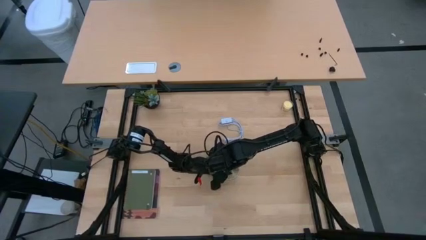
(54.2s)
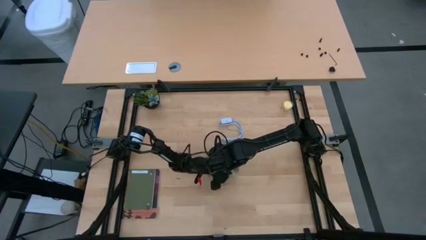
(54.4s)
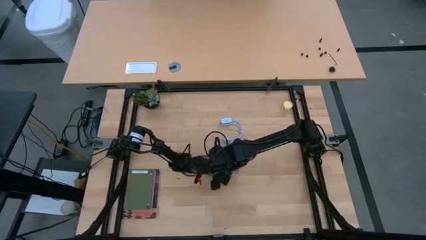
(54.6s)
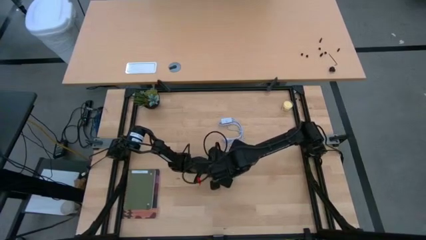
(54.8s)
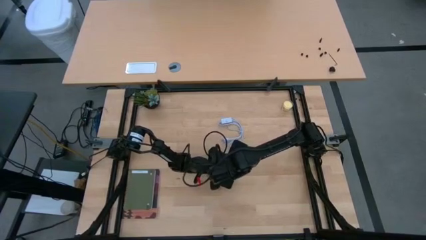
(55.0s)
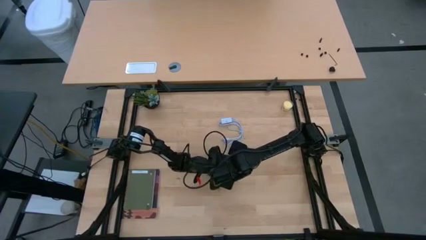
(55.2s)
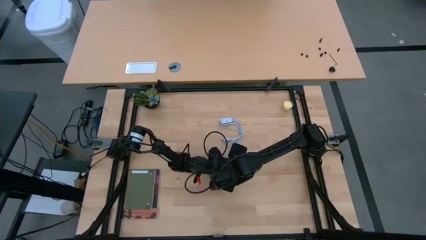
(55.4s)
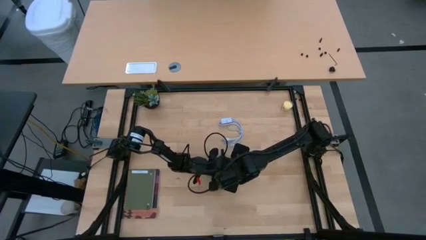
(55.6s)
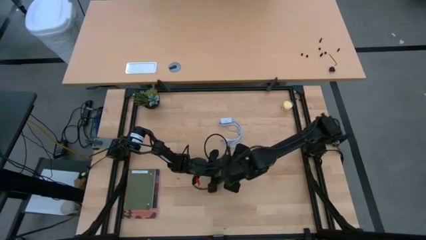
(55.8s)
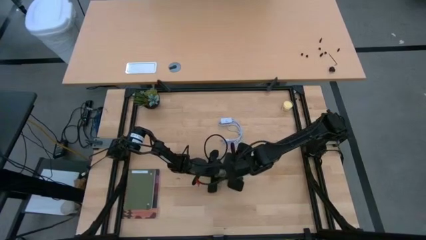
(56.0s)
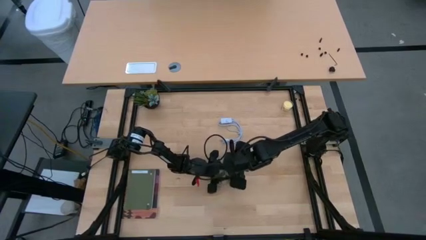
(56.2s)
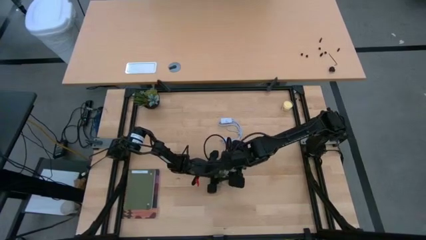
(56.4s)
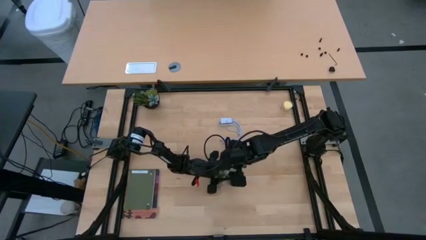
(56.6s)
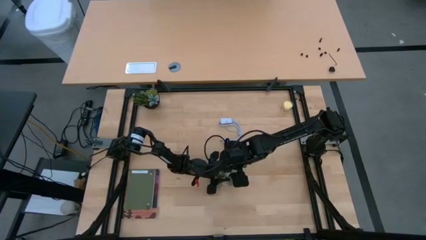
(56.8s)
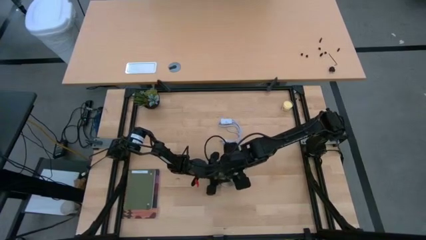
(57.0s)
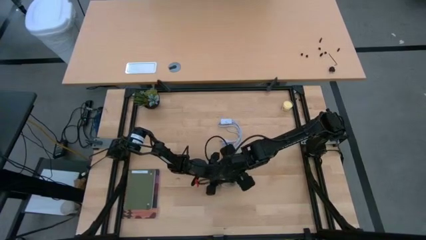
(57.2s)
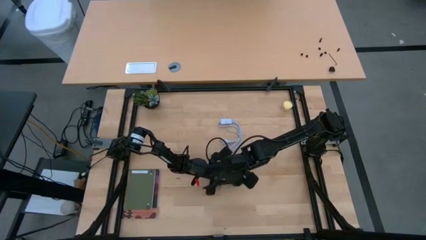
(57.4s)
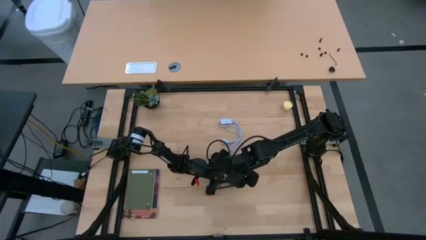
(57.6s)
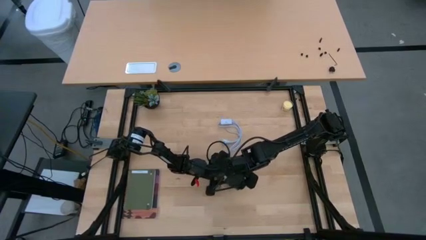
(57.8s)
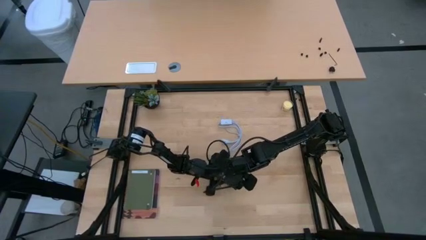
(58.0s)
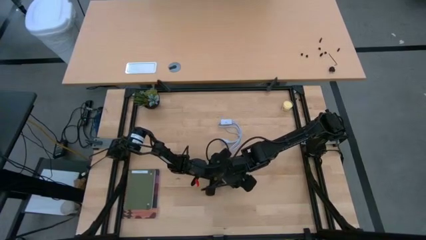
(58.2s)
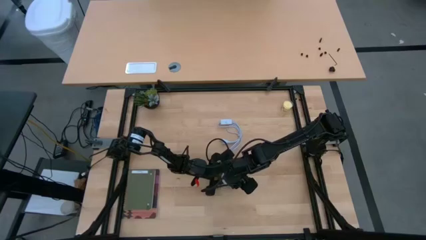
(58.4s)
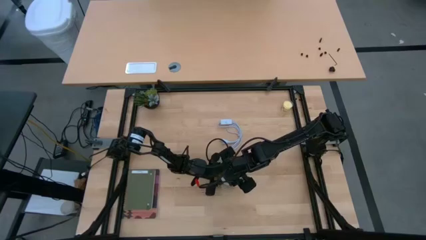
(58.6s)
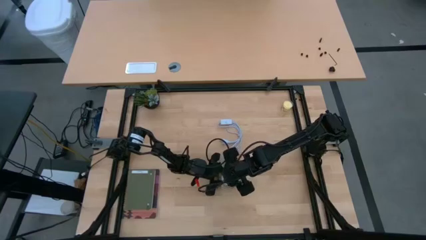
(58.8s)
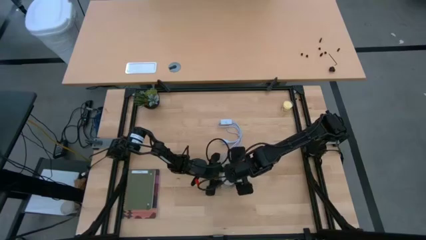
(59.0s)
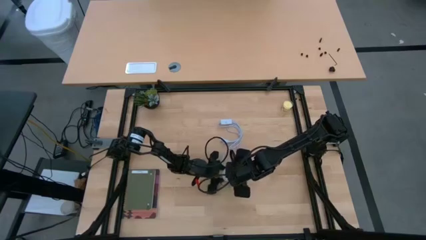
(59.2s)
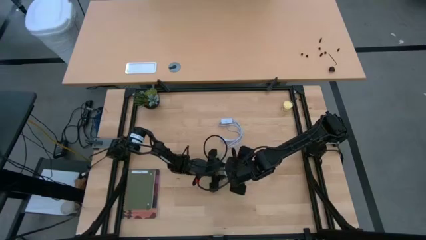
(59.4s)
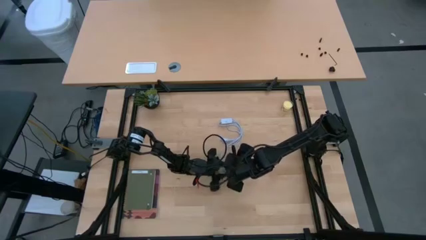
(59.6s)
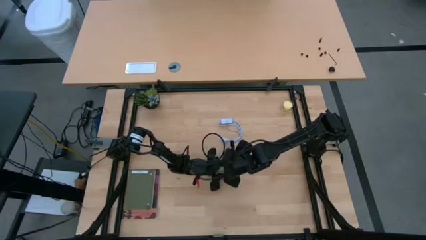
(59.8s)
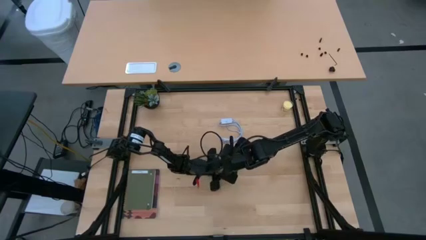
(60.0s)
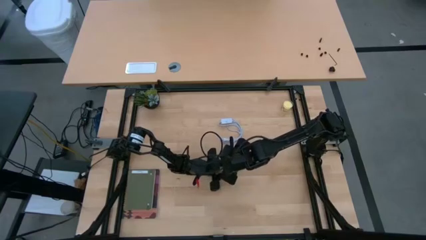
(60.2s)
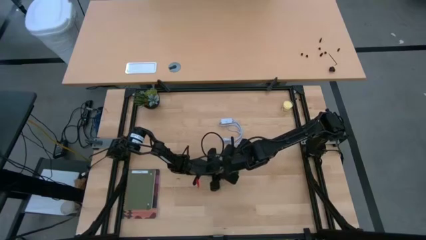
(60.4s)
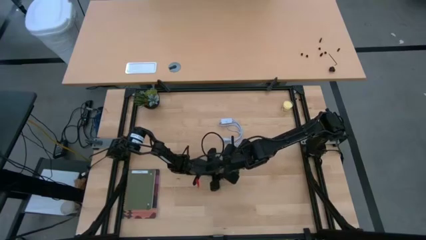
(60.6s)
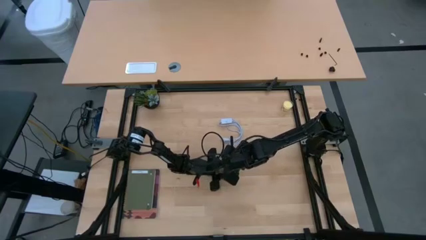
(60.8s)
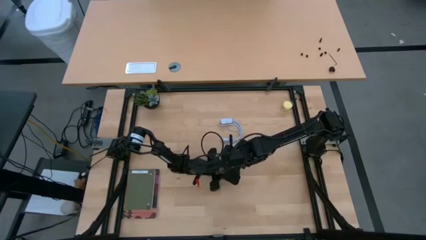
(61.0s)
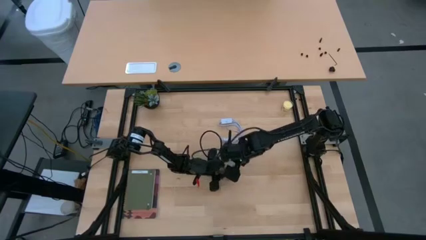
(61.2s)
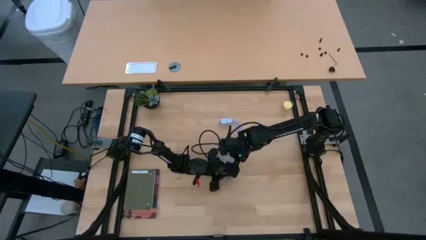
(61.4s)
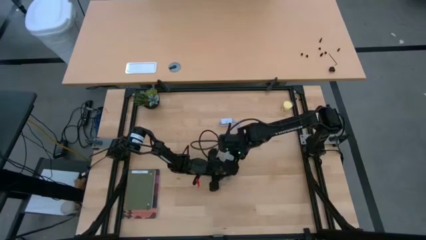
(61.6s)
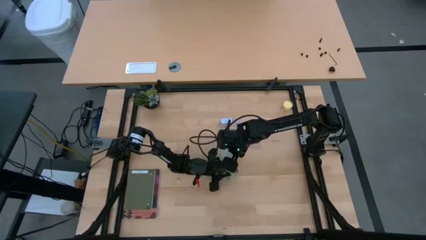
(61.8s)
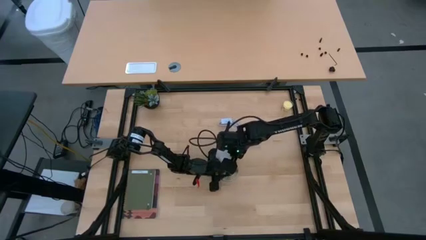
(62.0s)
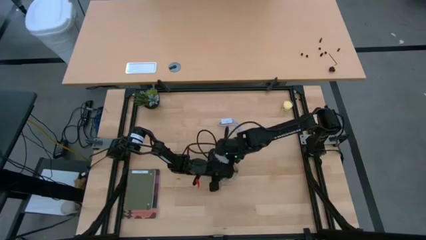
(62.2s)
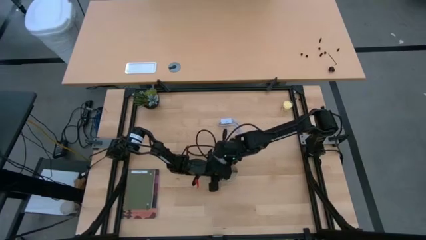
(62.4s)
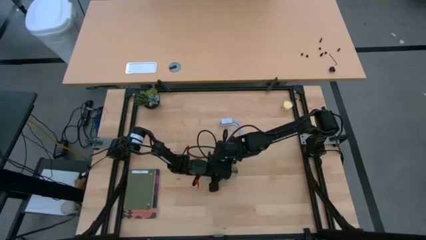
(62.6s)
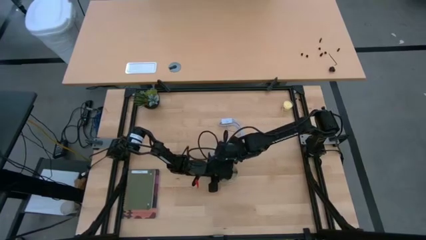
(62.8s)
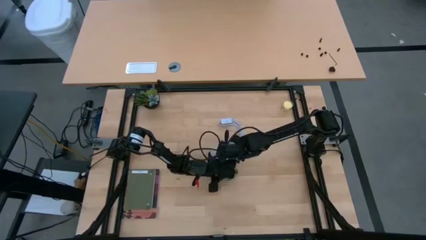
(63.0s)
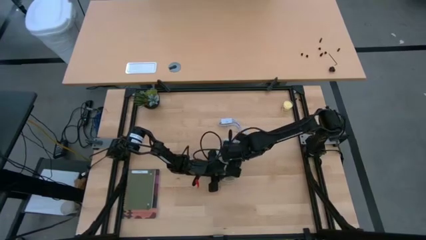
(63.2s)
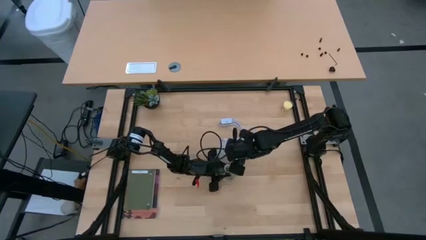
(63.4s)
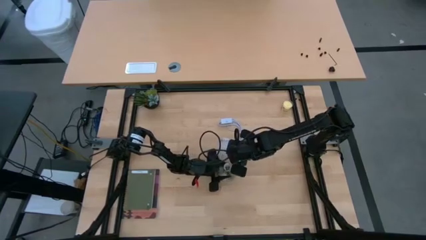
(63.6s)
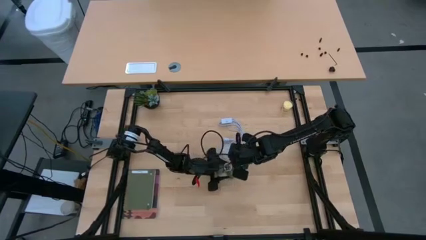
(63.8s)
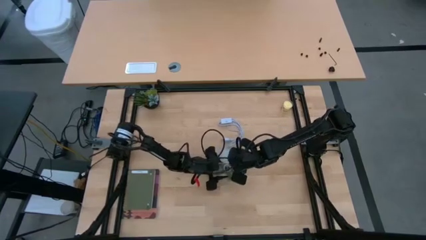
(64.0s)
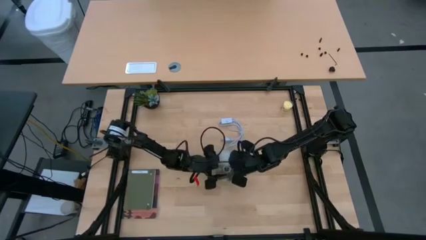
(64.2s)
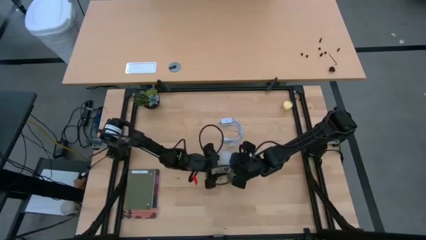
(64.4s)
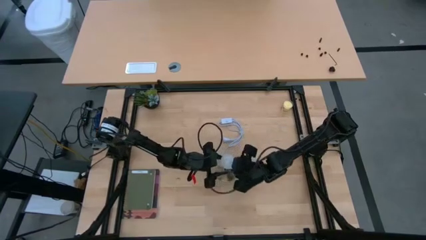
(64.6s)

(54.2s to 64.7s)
Task: Screw lightbulb
Insert the lightbulb into the lamp

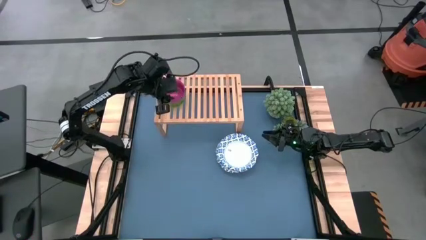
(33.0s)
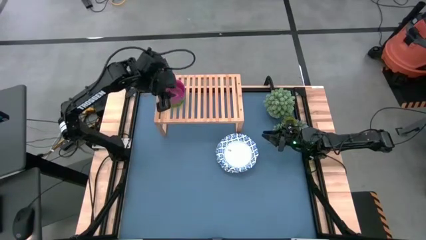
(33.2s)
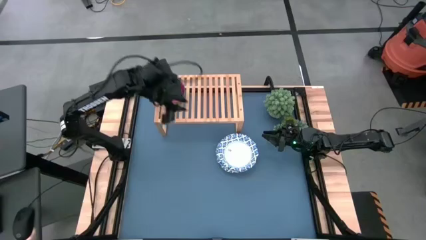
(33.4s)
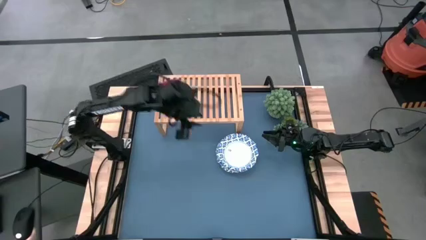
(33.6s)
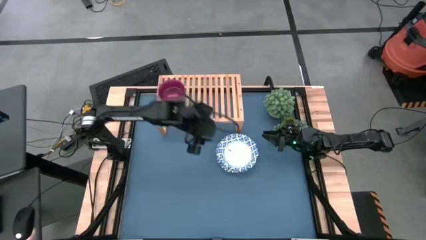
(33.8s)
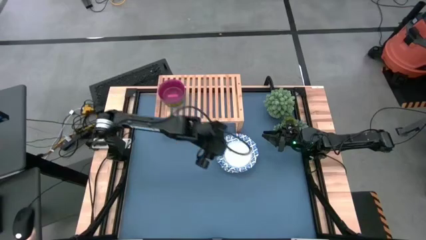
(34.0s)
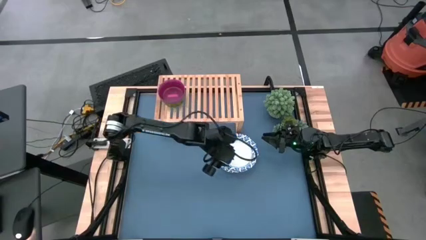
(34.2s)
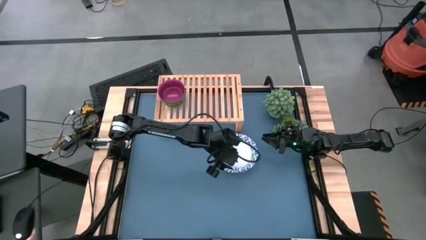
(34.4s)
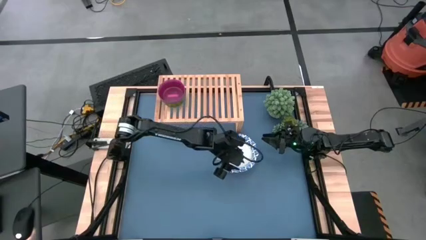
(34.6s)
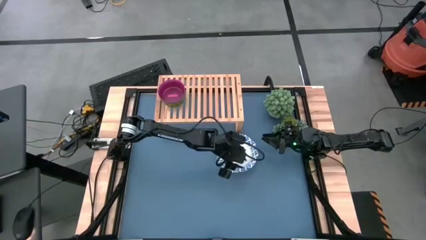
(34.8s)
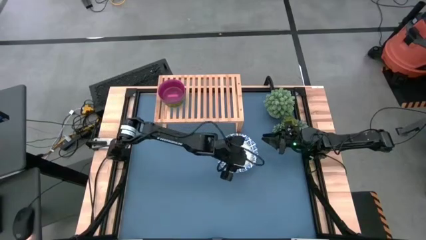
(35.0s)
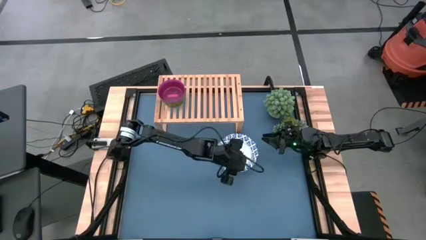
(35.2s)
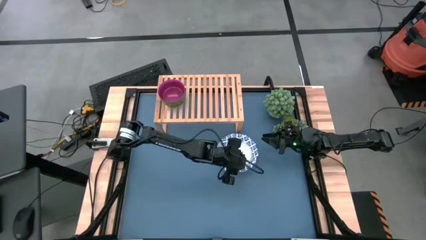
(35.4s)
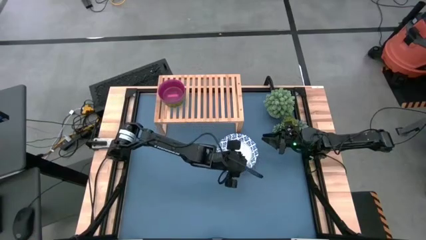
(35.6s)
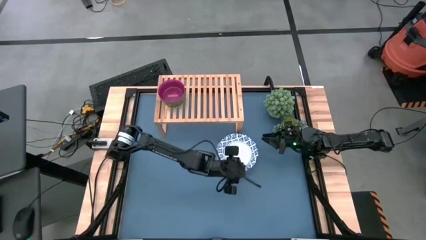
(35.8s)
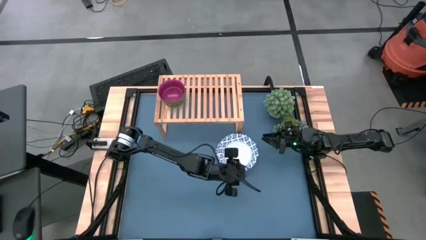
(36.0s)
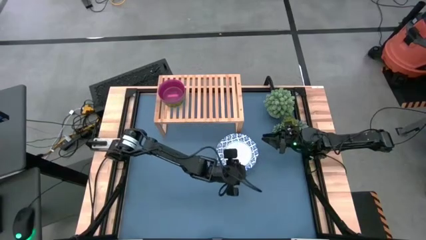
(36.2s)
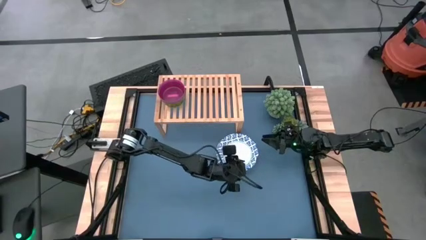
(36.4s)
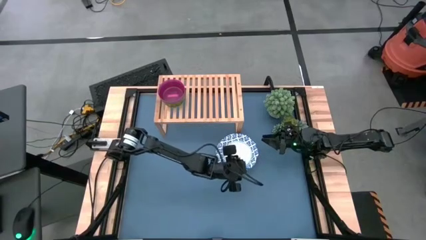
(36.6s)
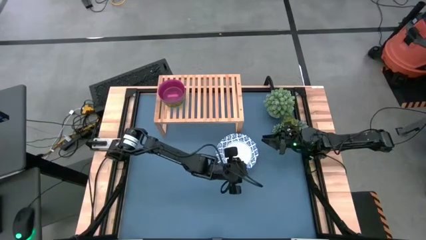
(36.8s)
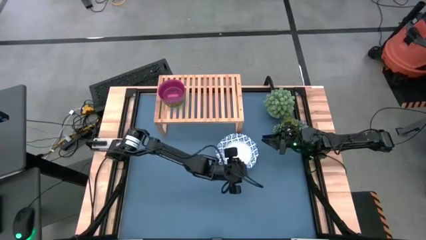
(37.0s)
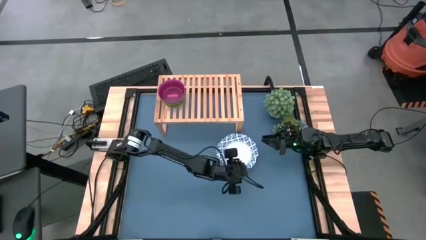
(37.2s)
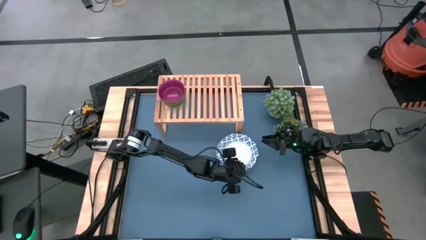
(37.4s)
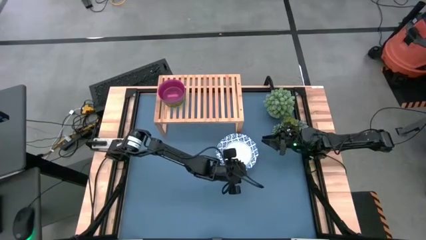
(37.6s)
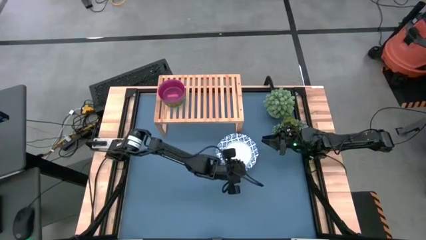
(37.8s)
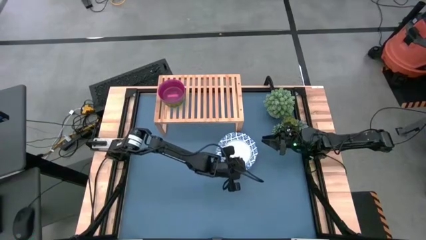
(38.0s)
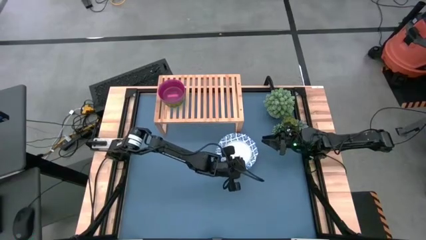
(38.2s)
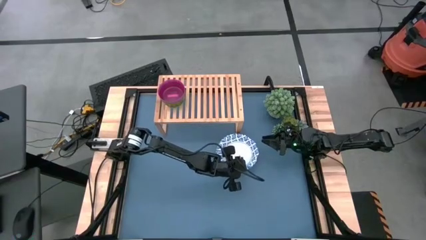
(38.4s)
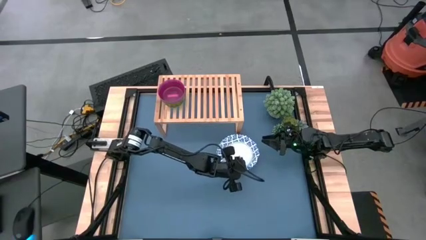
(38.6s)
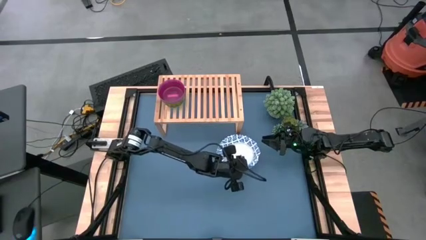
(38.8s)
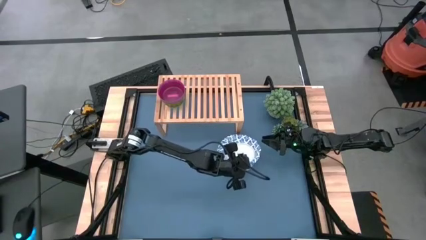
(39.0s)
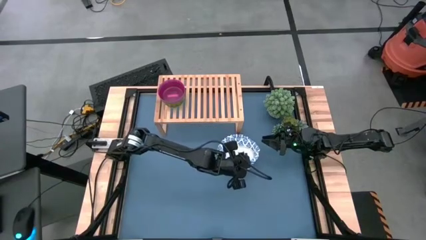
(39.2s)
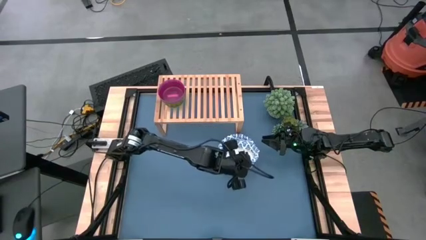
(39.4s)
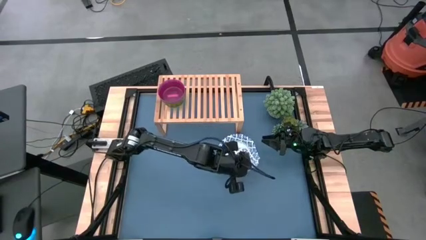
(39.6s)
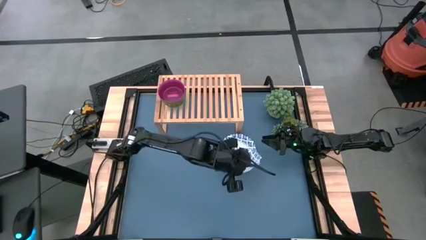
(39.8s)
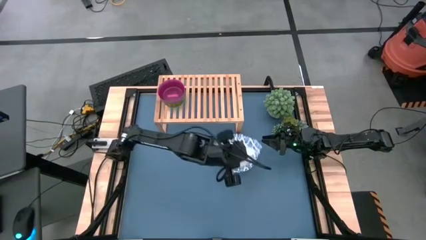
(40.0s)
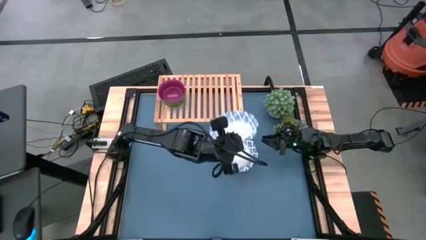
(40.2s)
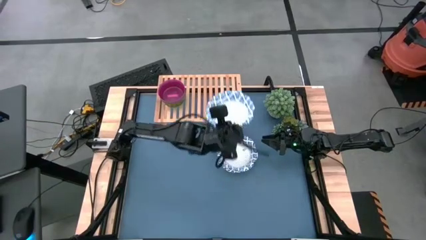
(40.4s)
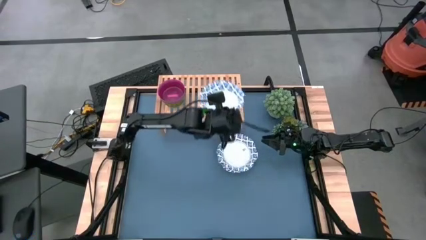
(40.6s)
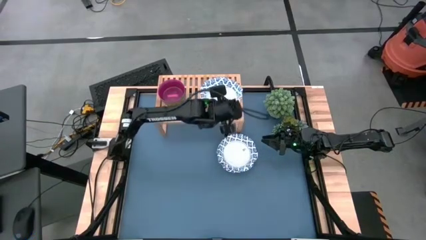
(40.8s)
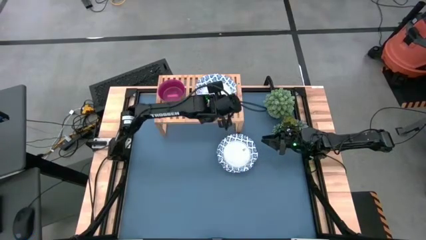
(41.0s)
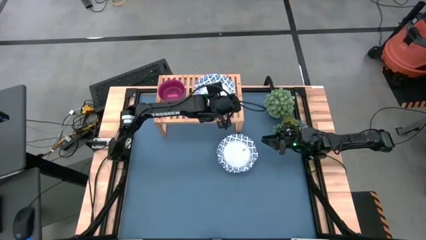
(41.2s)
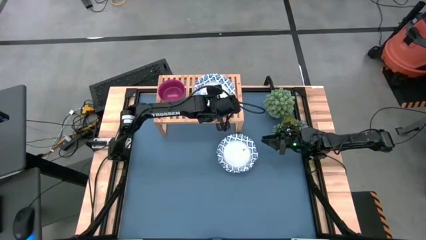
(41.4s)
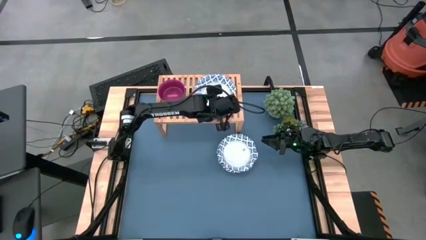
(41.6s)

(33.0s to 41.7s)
Task: Place and stack bowls onto a shelf
Put the blue patterned bowl on the shelf
